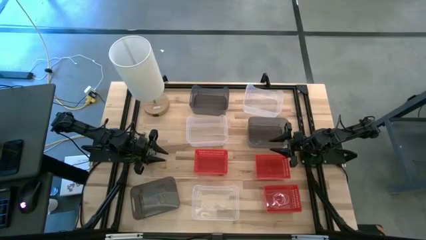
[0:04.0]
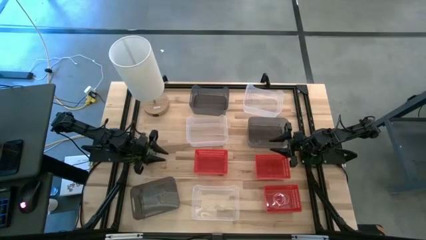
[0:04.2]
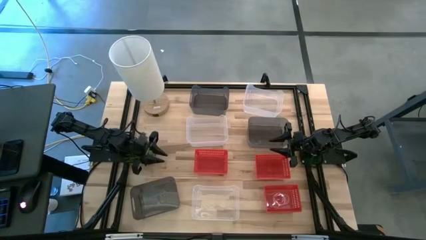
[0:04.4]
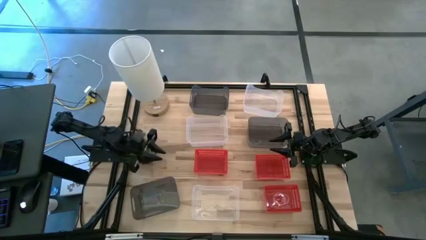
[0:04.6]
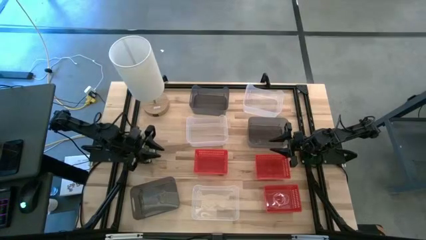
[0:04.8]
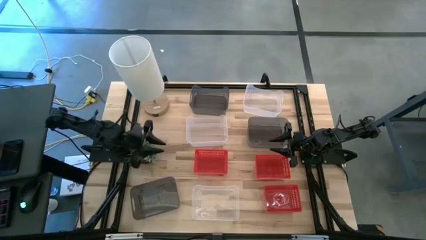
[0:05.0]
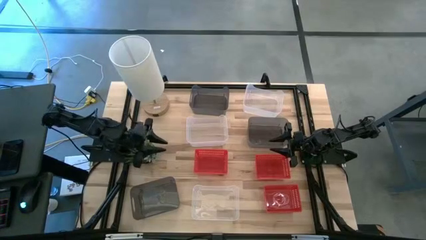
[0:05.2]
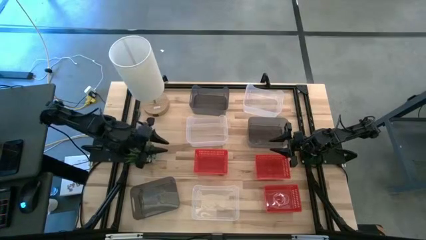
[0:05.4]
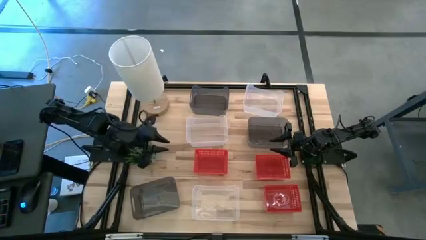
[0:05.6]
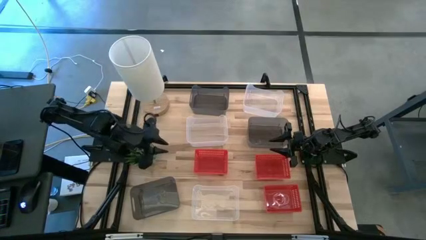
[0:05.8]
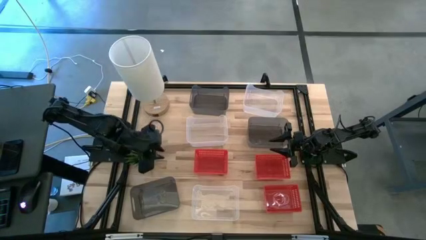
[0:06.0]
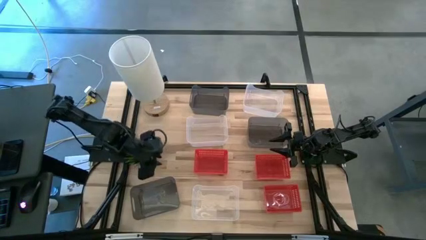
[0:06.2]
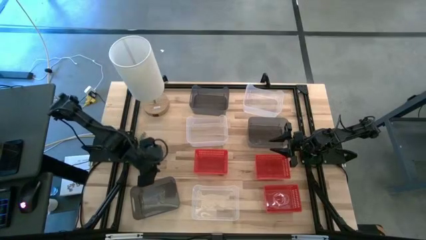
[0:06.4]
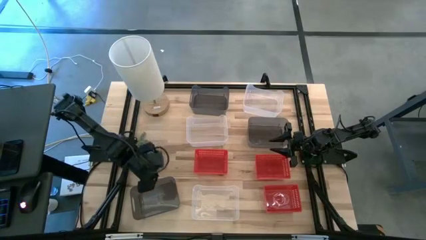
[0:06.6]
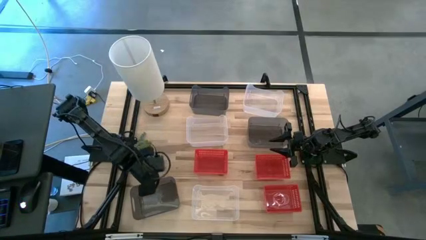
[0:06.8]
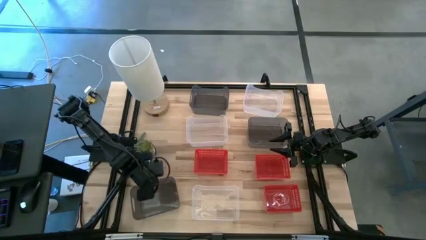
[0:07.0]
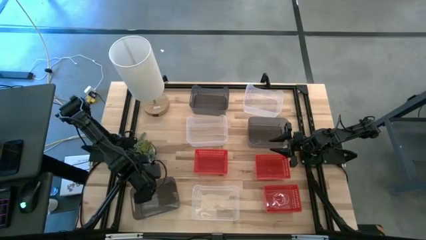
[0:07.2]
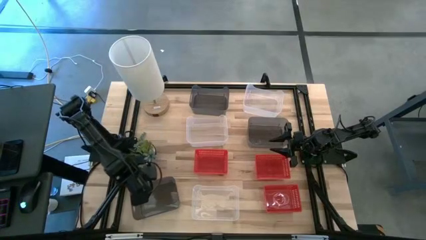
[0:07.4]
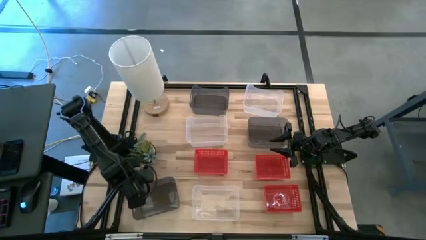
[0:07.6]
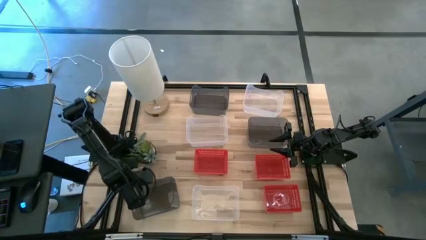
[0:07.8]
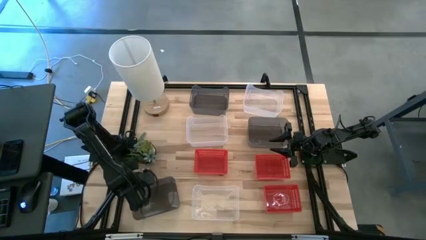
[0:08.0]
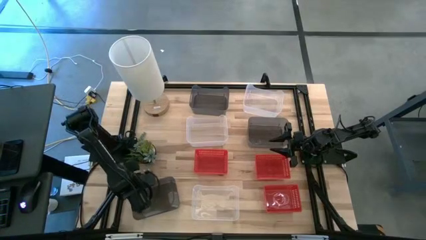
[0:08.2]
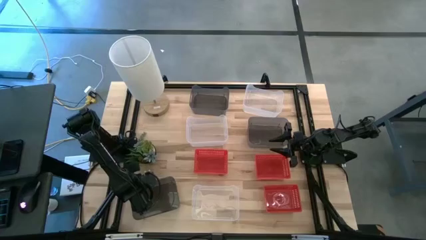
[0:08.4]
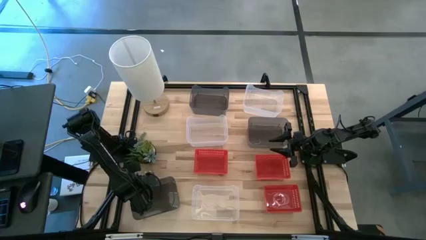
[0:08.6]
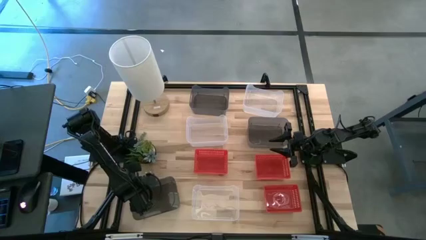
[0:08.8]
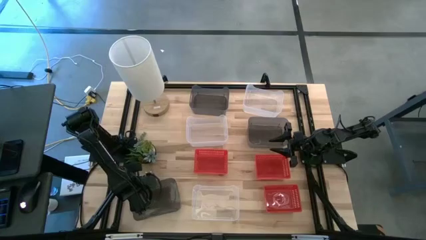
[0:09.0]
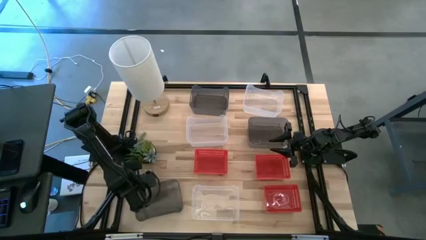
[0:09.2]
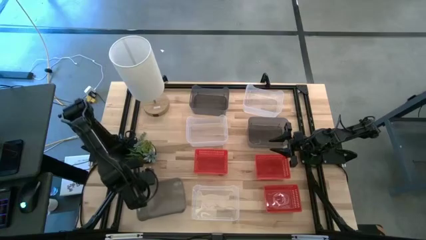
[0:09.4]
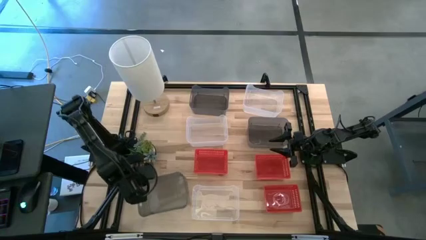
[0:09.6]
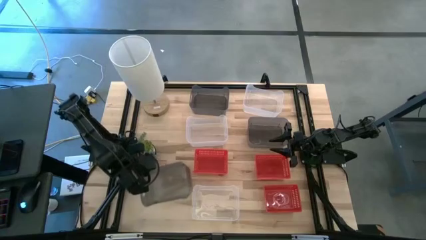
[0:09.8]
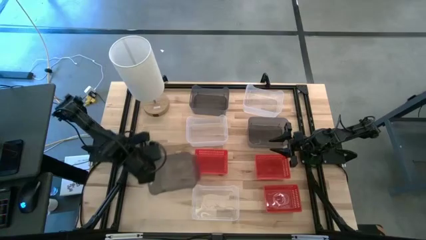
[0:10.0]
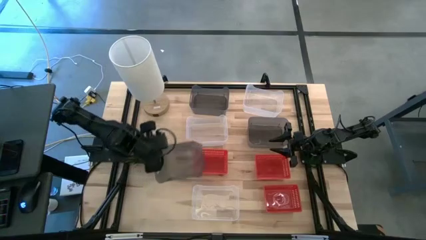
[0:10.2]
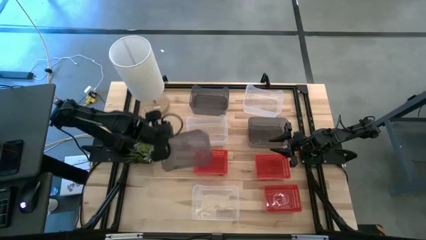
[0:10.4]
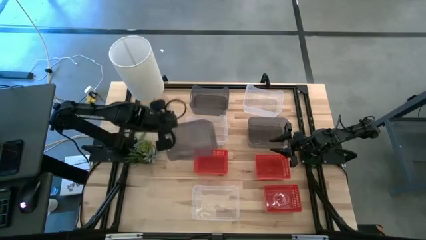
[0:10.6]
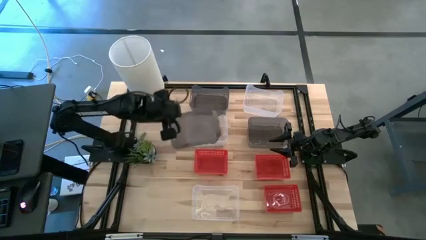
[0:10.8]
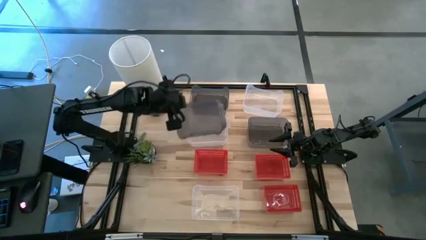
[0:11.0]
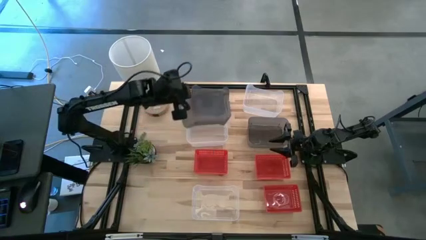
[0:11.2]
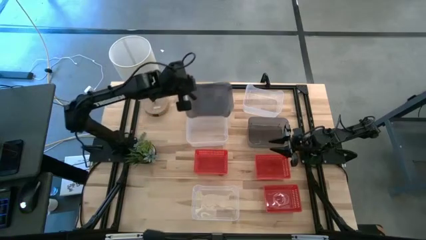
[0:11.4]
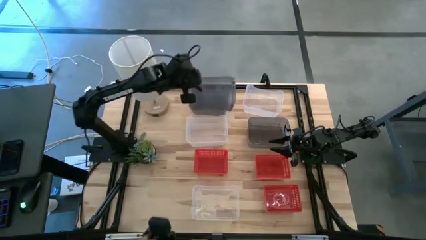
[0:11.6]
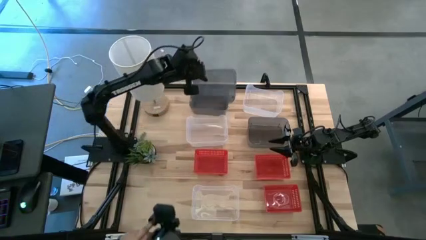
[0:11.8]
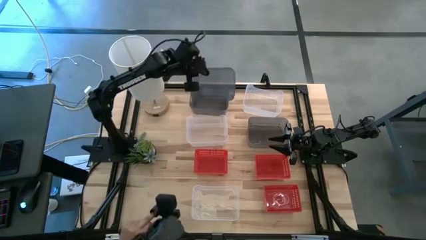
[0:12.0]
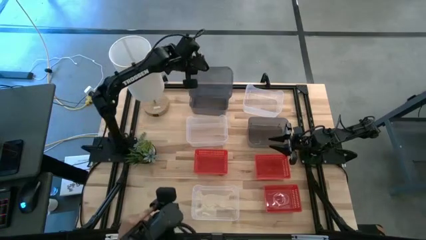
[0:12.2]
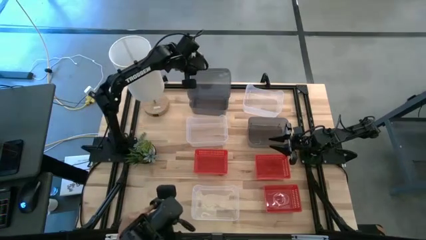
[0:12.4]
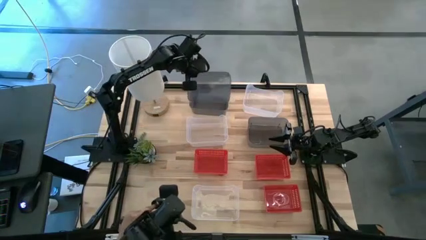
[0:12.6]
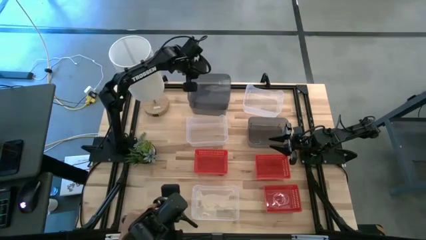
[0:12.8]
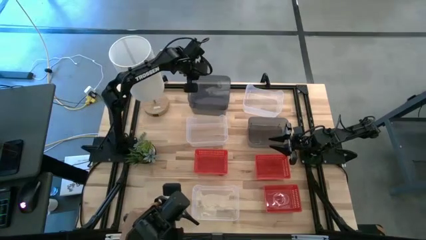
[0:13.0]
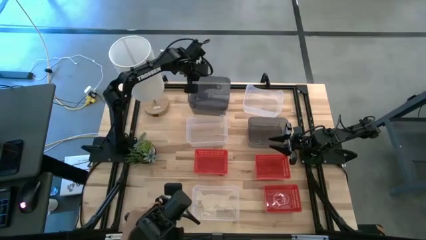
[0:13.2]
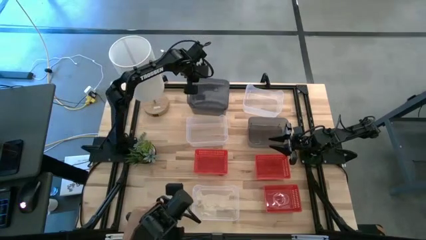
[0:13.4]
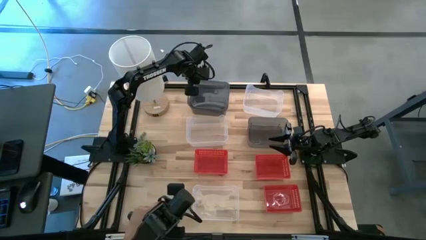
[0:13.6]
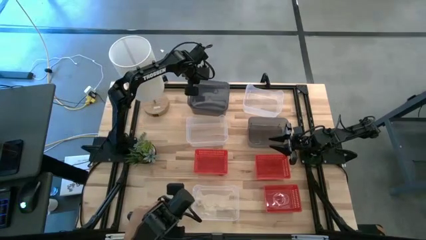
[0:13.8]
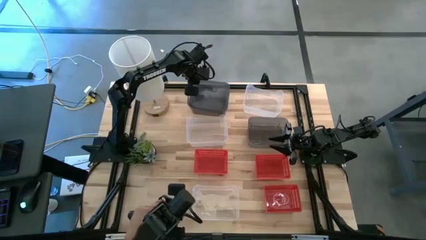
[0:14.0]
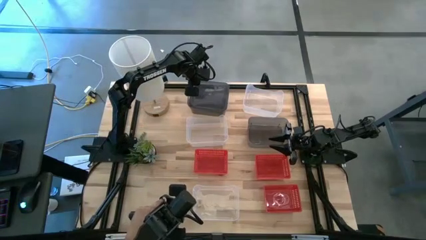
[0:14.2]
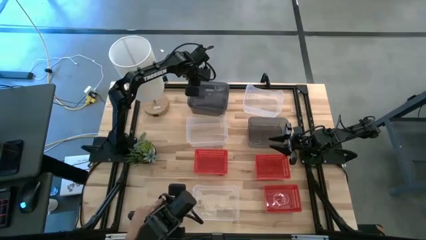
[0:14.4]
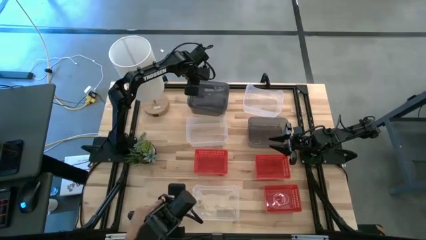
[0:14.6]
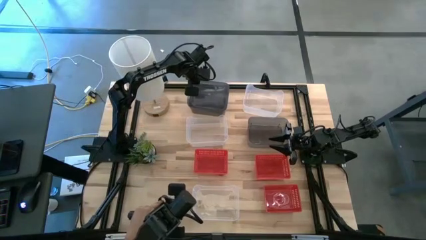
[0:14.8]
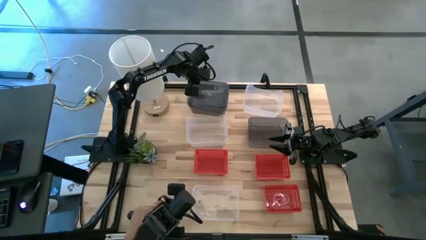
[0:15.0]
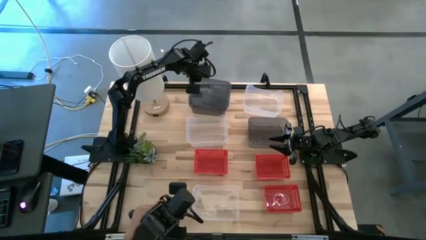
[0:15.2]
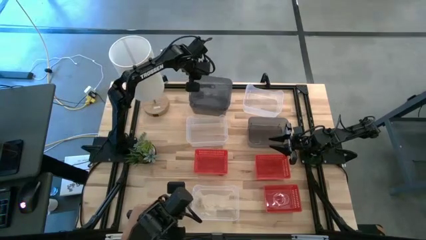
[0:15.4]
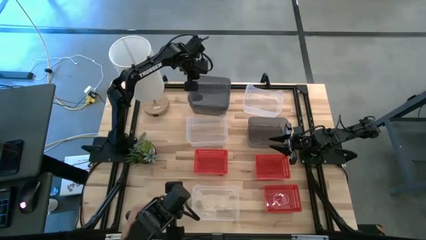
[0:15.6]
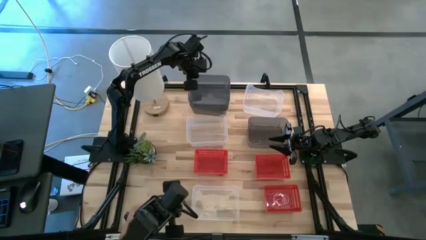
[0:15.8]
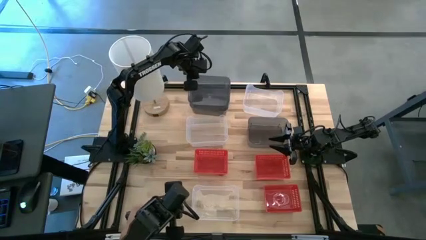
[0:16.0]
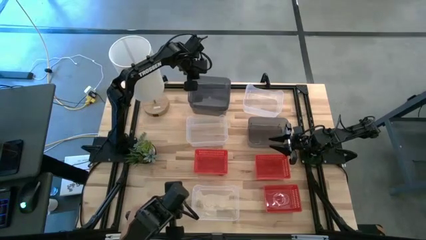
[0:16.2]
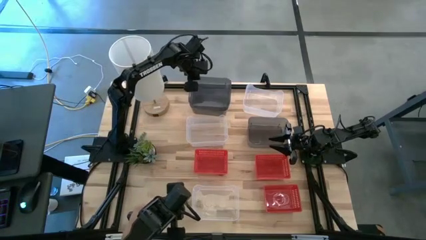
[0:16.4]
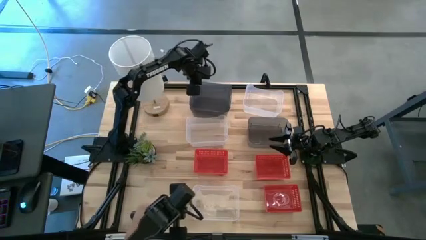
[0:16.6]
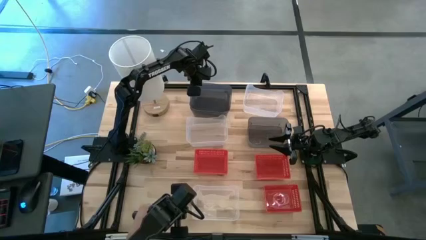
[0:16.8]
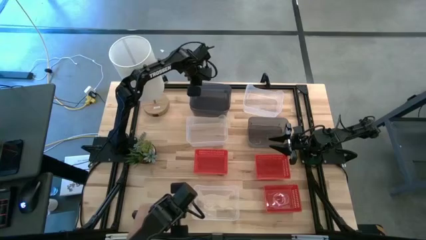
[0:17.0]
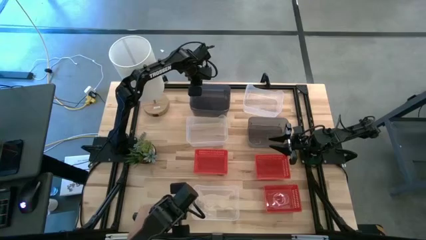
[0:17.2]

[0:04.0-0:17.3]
Stack the bottom black bin on the left black bin
